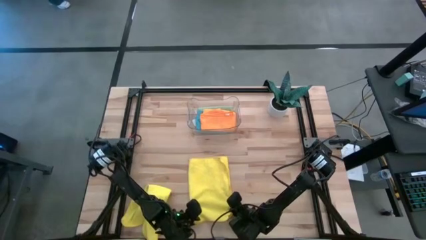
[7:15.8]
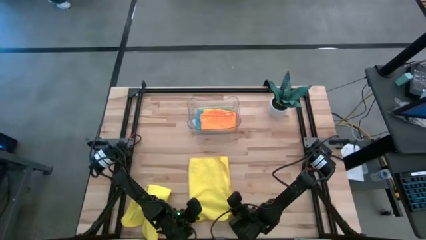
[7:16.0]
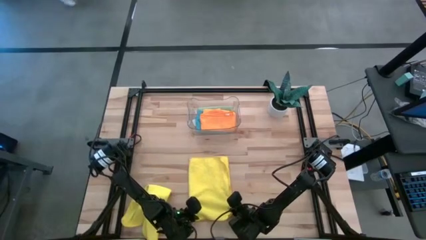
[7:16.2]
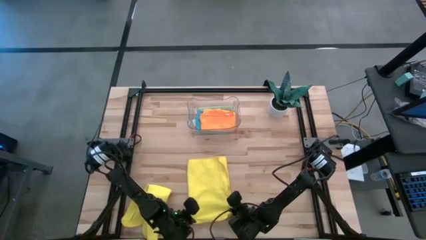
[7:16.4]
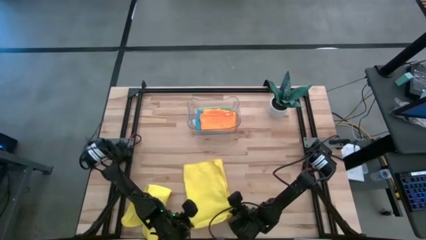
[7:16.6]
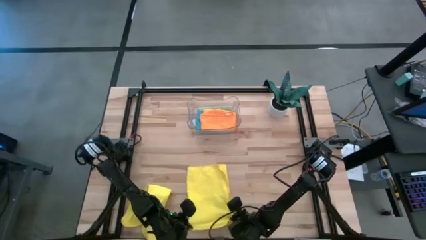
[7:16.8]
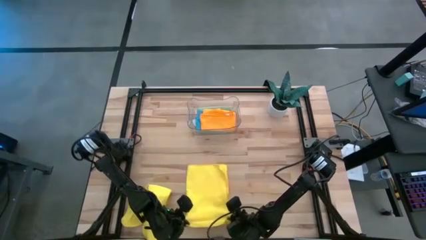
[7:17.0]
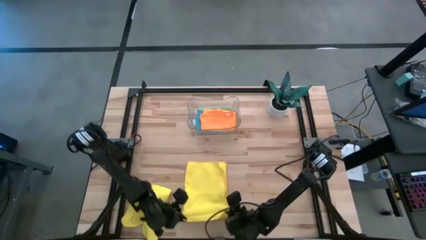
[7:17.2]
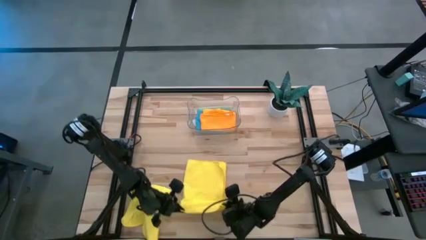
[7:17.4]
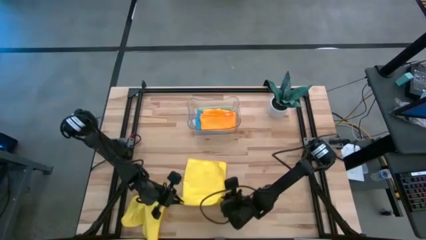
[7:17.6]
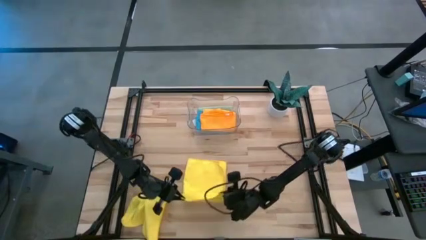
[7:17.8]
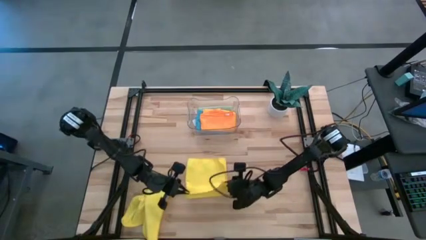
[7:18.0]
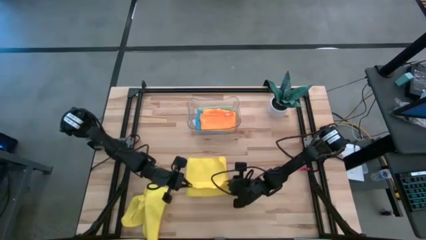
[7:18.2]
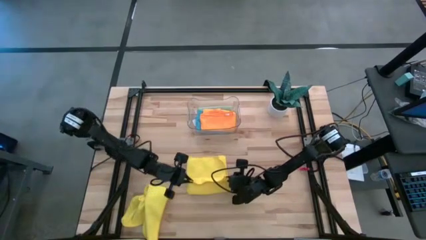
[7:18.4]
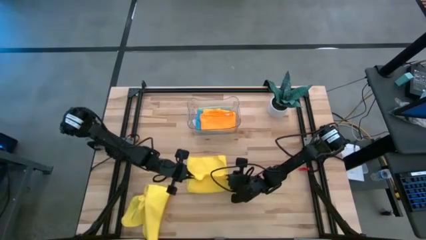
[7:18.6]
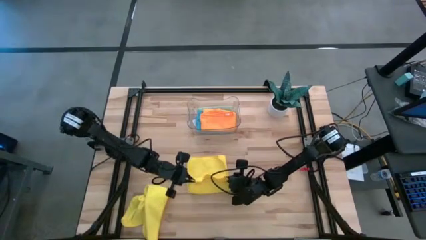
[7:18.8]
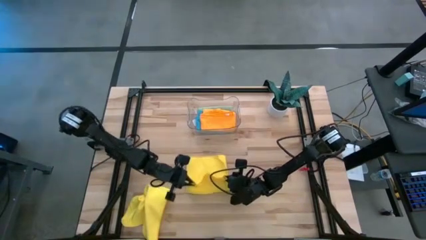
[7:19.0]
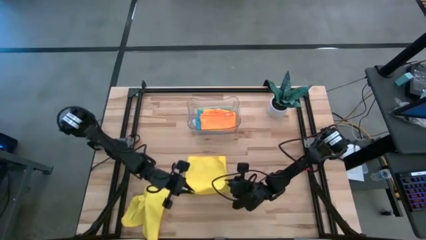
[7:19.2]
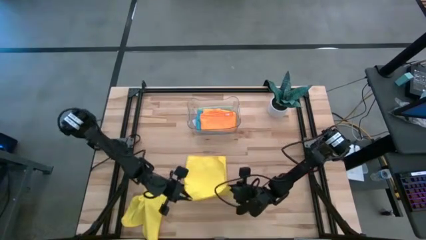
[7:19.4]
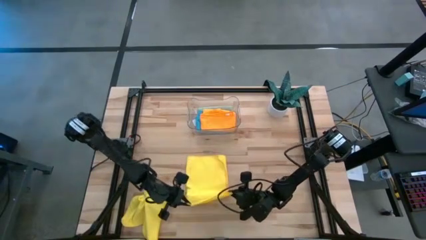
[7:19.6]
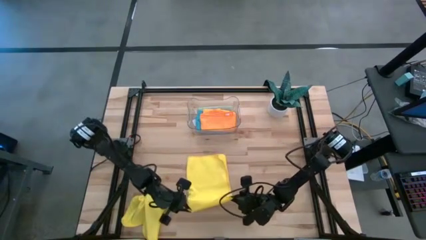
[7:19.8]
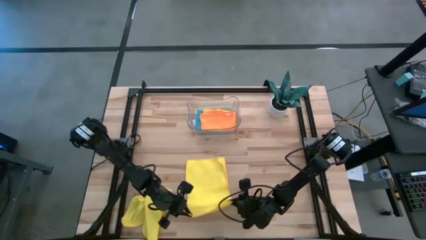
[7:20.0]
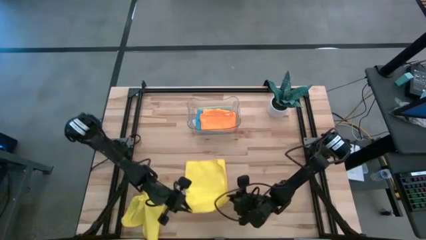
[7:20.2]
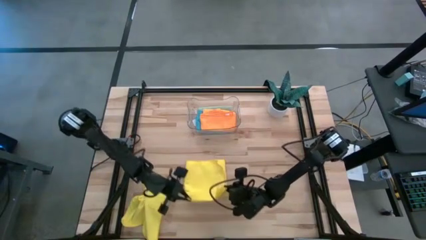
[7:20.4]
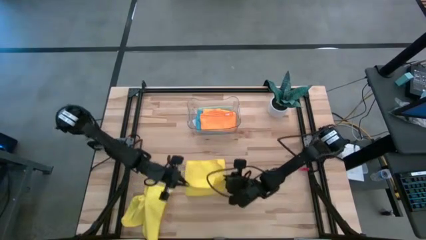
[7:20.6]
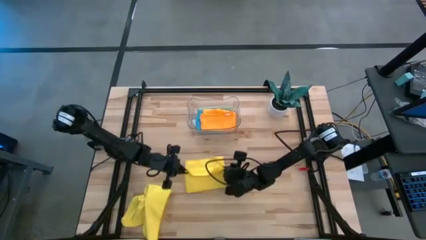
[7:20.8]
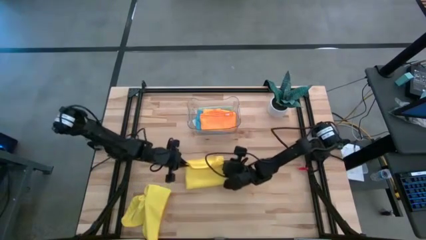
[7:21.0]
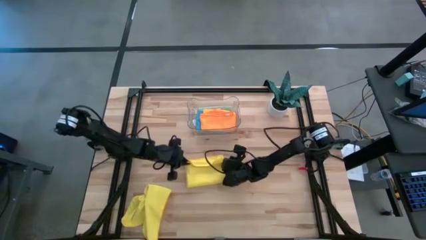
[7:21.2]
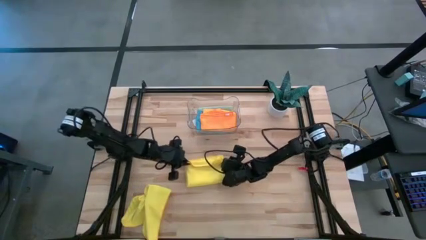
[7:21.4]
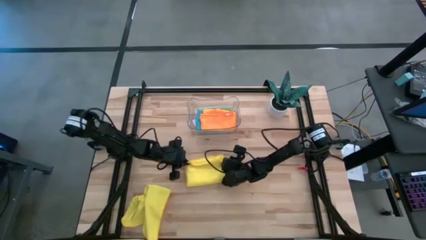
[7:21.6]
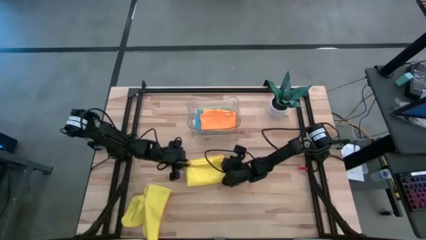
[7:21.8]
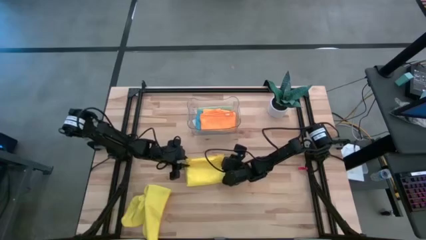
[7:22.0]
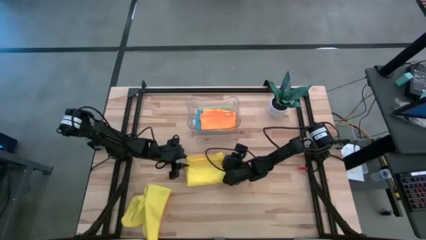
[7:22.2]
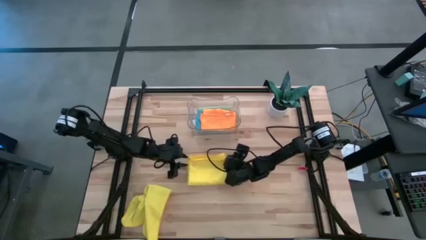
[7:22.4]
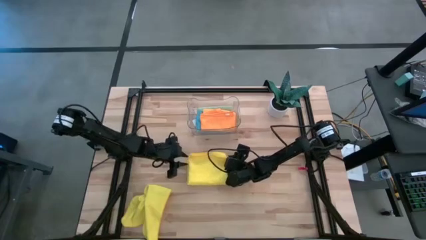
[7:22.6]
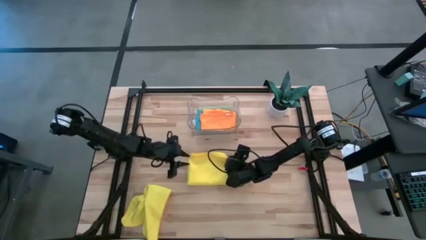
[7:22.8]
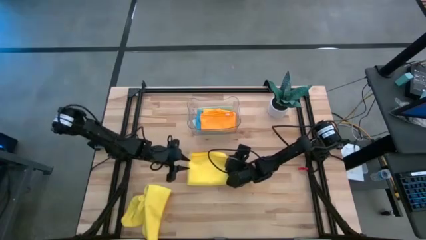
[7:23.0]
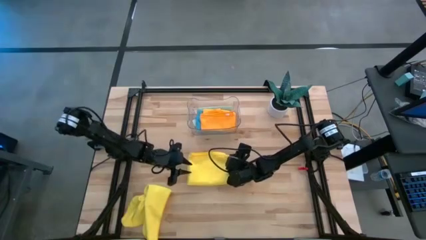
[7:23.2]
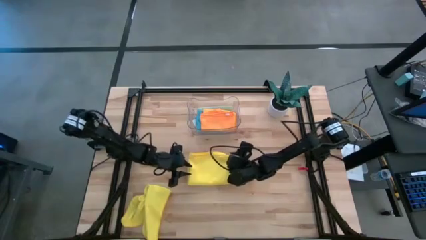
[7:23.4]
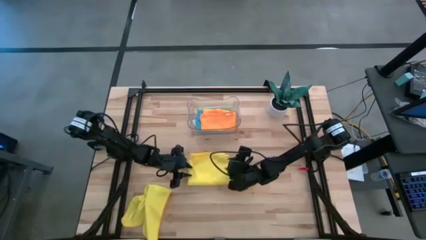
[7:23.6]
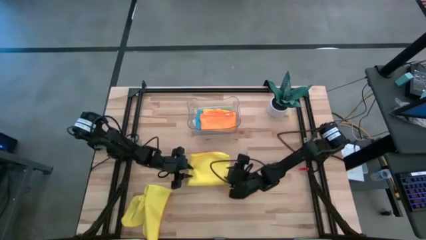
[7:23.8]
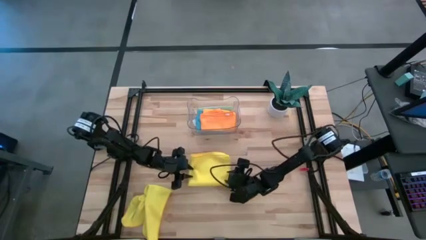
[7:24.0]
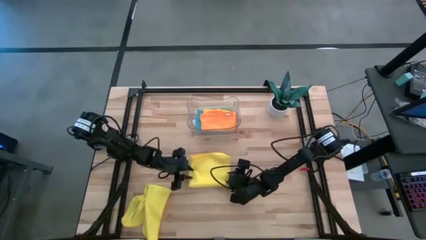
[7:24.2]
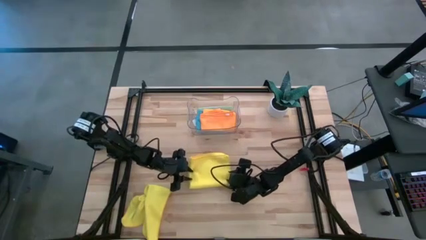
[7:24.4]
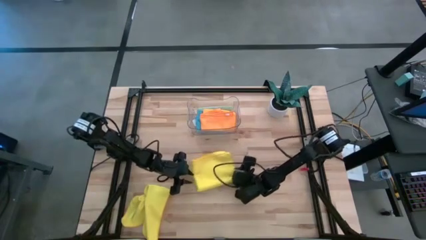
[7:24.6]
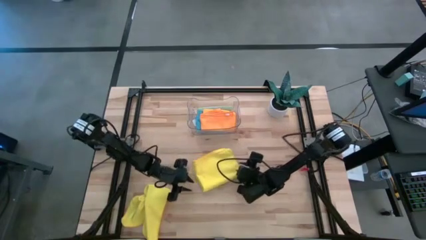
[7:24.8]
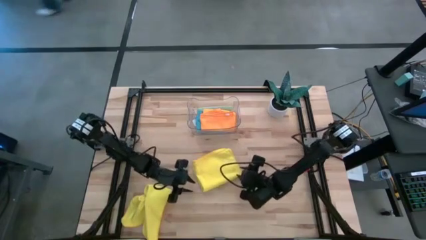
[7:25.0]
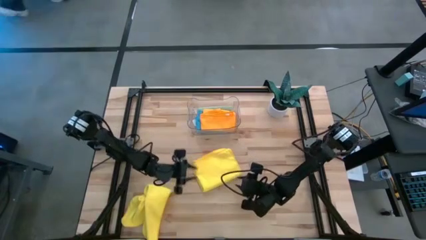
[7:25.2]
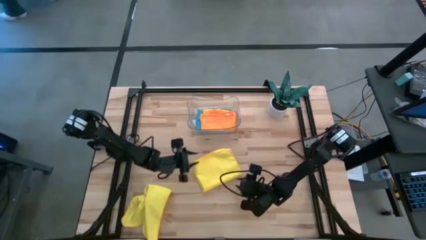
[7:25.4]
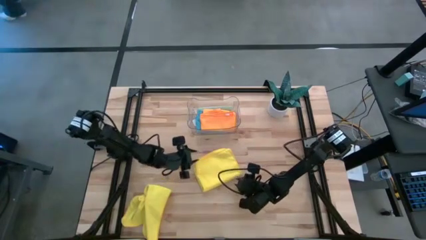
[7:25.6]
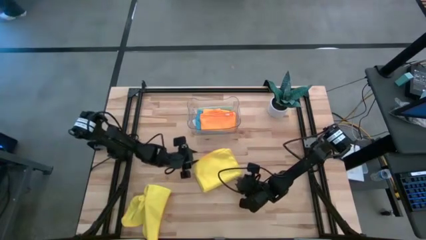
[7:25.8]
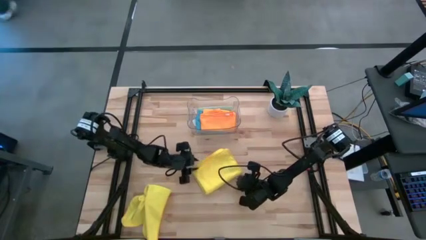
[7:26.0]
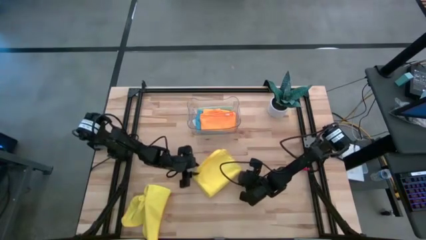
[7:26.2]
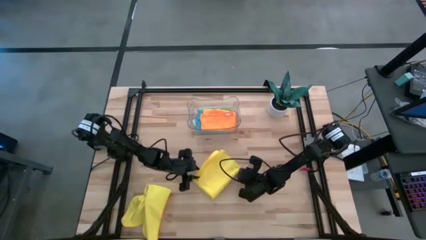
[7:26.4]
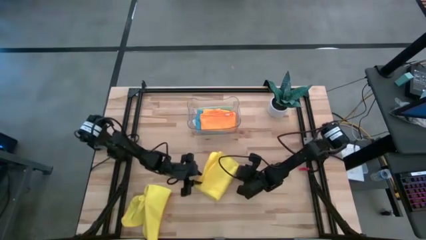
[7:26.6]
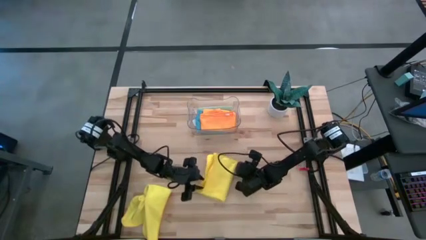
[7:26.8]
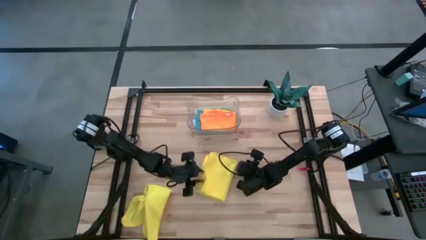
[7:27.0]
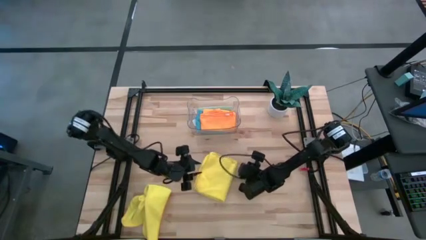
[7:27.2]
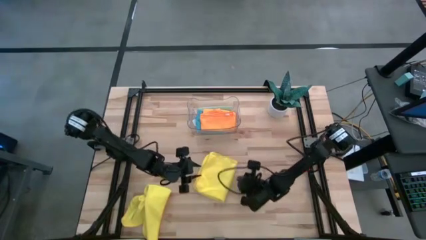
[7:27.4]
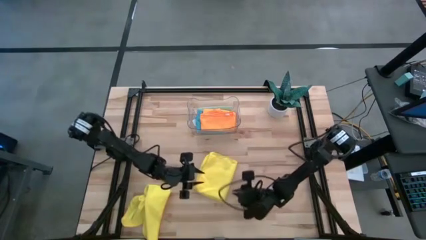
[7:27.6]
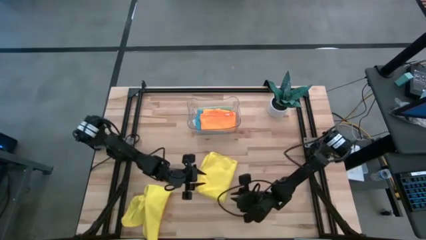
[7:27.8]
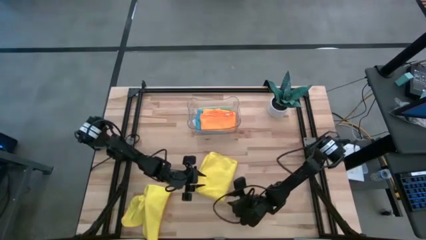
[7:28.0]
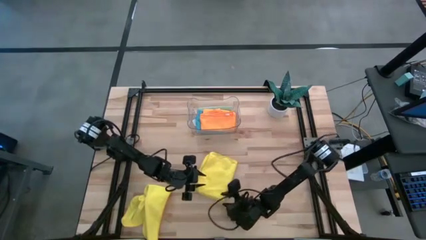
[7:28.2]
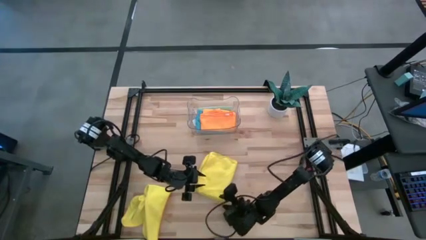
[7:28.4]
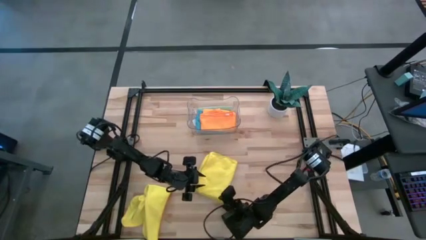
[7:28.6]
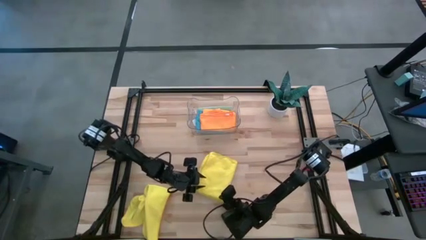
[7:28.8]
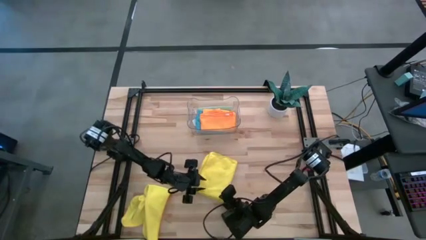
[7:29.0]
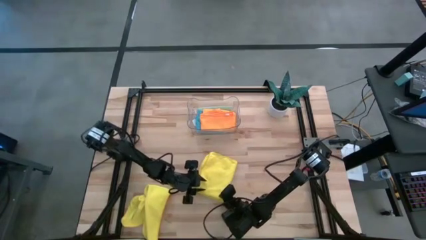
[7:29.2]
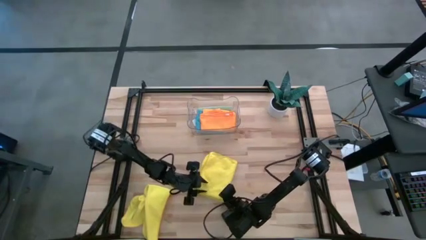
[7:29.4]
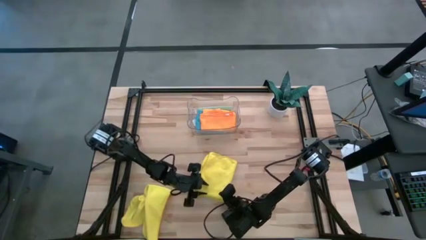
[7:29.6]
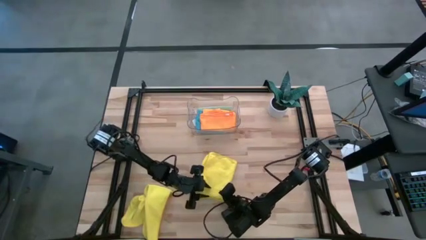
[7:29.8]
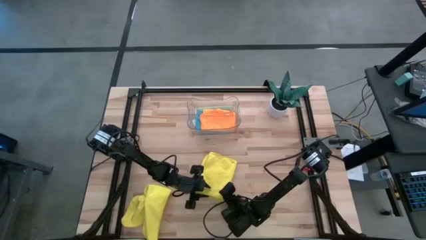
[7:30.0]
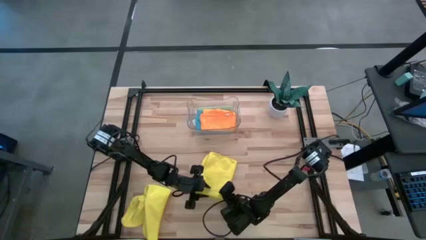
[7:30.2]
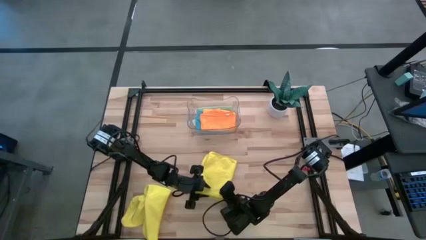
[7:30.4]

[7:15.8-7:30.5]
Task: Fold microfiber towels
Fold the top yellow towel
